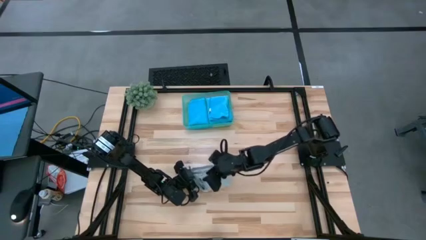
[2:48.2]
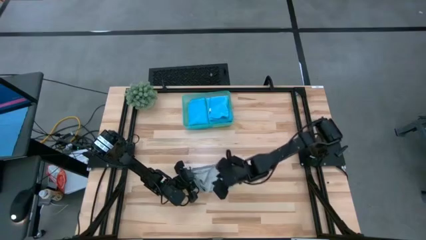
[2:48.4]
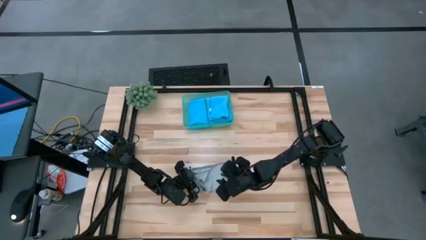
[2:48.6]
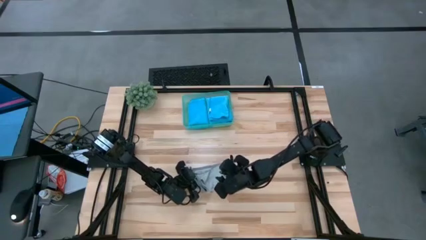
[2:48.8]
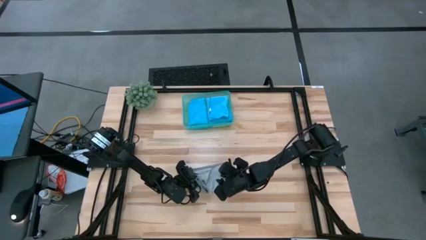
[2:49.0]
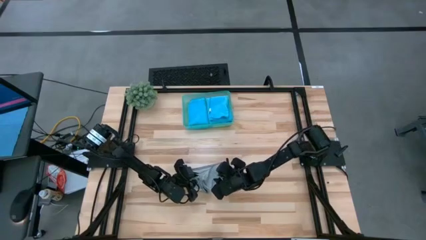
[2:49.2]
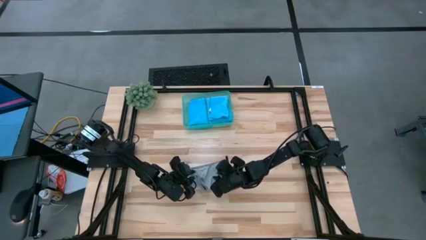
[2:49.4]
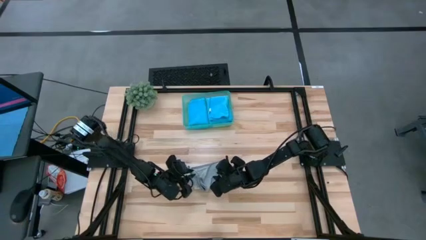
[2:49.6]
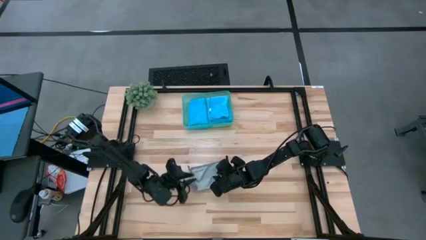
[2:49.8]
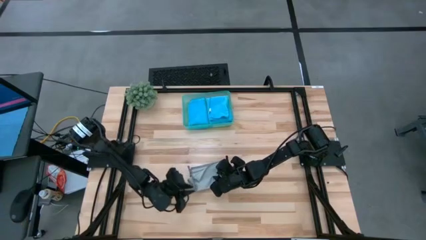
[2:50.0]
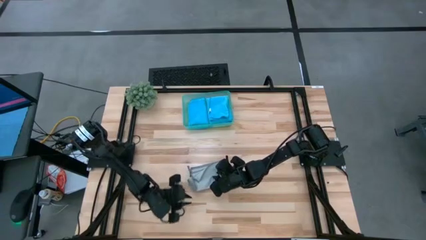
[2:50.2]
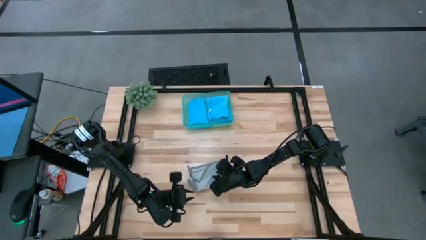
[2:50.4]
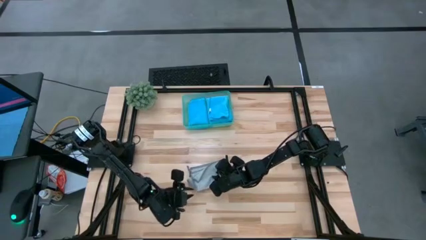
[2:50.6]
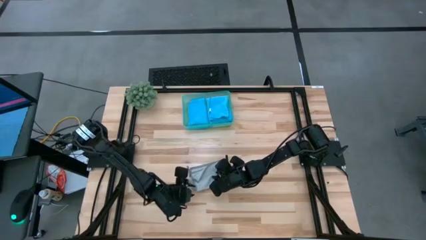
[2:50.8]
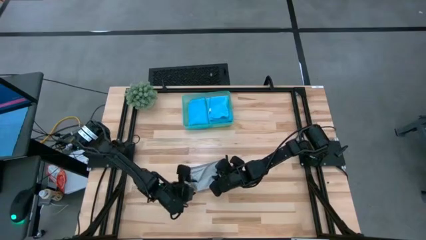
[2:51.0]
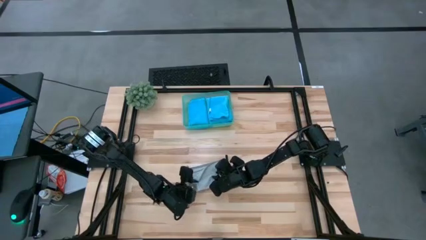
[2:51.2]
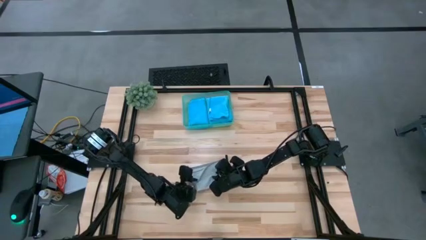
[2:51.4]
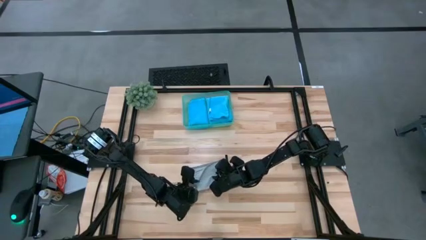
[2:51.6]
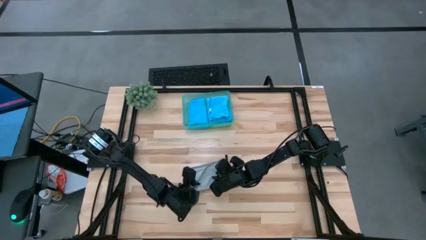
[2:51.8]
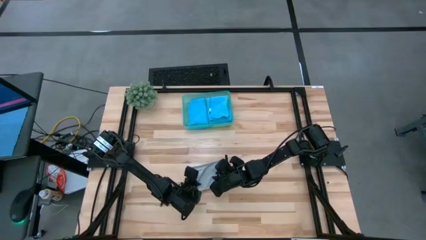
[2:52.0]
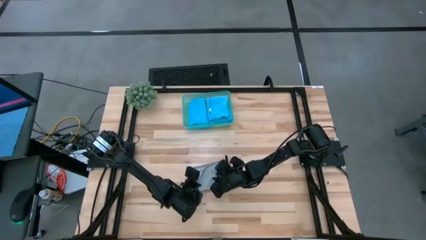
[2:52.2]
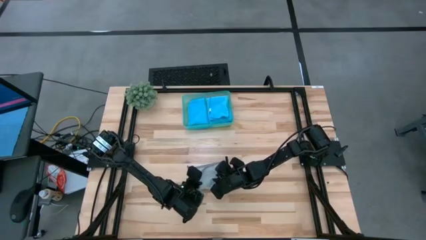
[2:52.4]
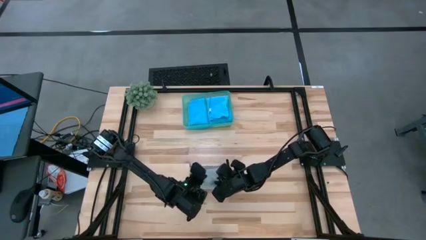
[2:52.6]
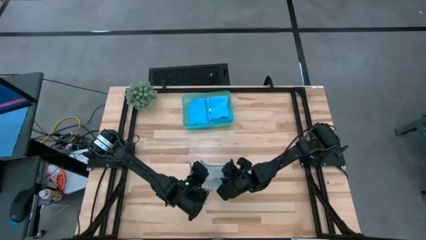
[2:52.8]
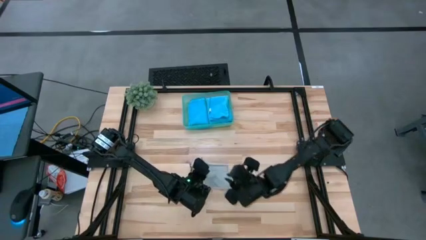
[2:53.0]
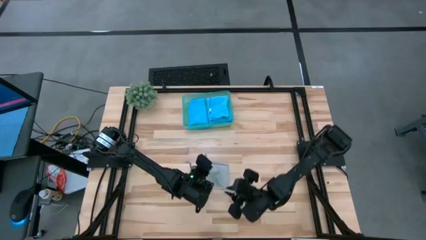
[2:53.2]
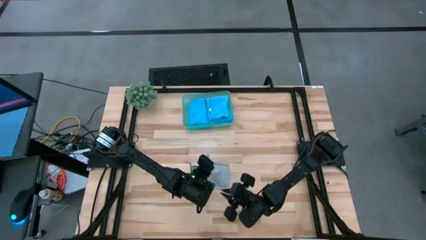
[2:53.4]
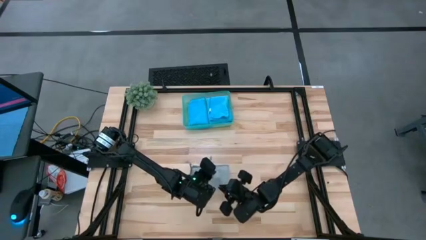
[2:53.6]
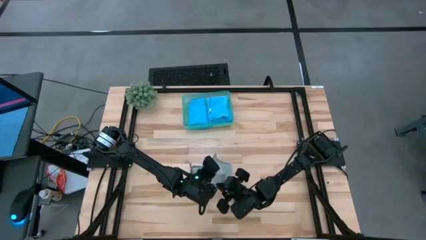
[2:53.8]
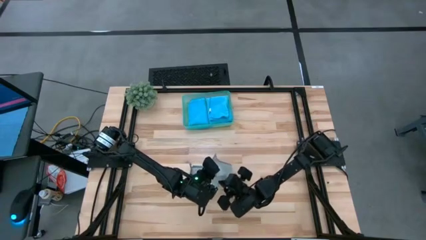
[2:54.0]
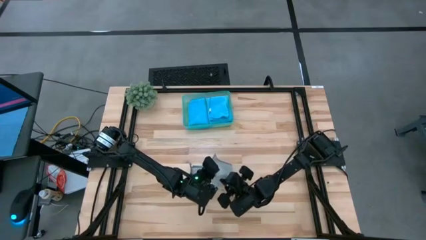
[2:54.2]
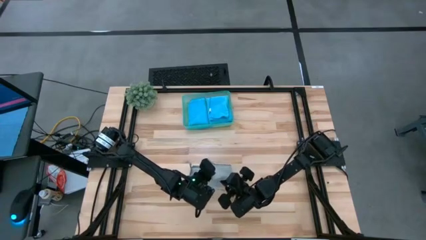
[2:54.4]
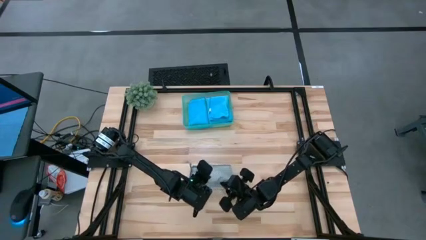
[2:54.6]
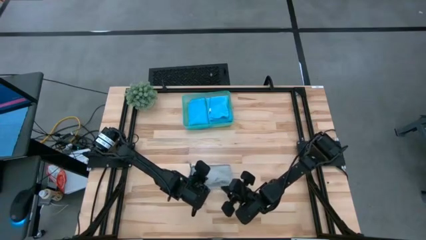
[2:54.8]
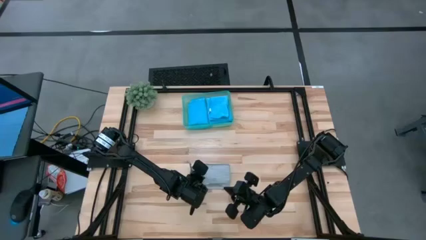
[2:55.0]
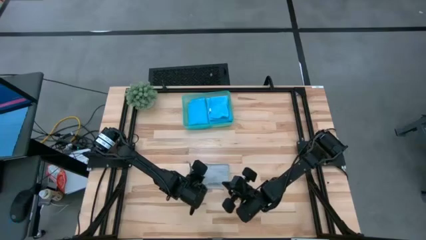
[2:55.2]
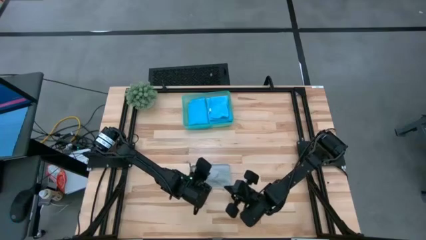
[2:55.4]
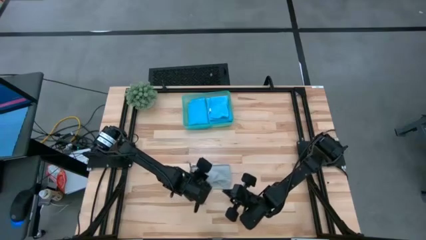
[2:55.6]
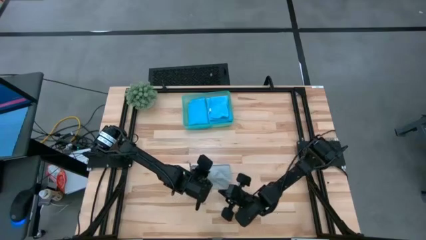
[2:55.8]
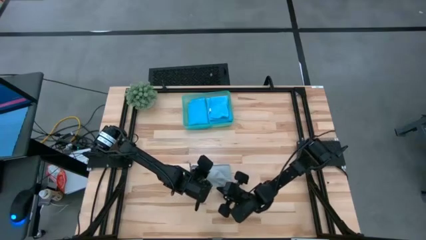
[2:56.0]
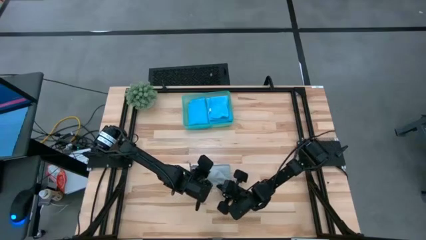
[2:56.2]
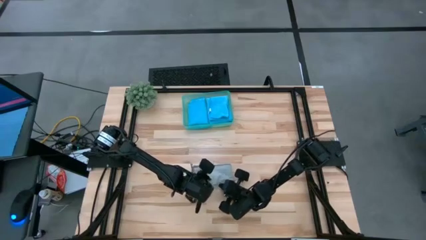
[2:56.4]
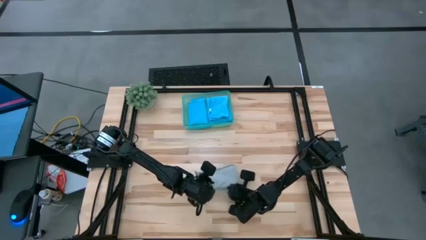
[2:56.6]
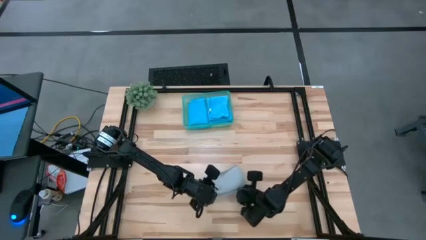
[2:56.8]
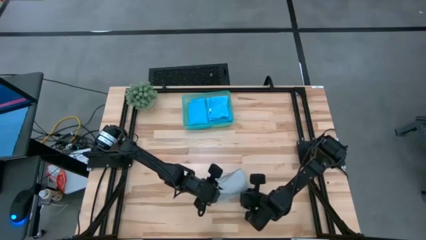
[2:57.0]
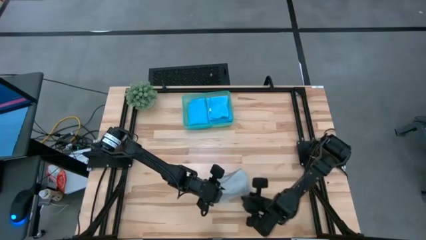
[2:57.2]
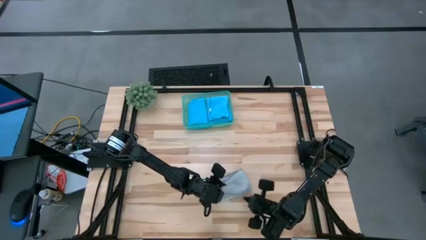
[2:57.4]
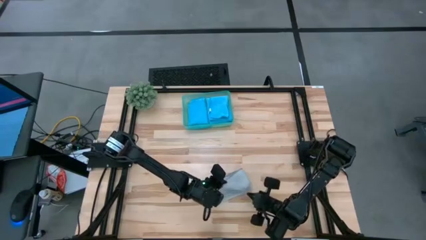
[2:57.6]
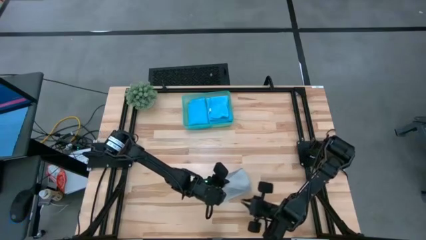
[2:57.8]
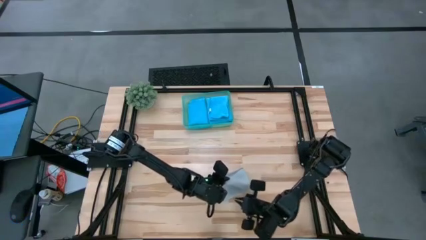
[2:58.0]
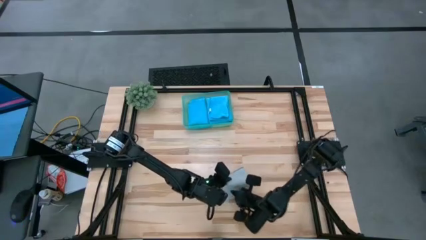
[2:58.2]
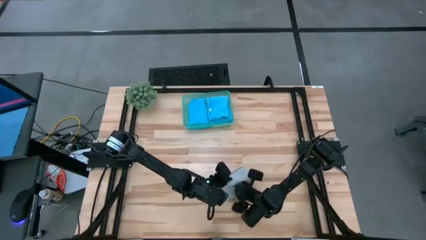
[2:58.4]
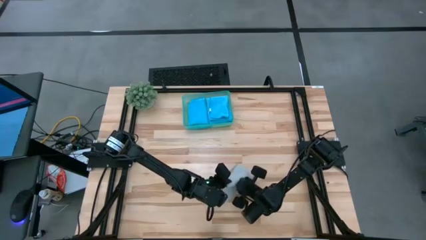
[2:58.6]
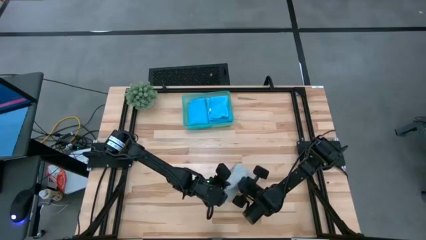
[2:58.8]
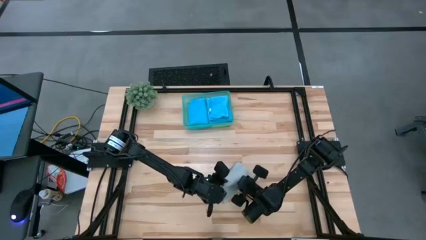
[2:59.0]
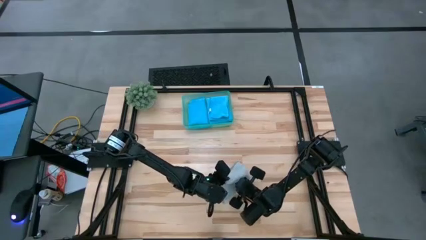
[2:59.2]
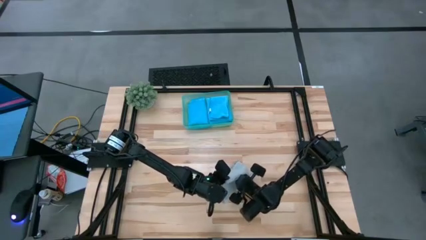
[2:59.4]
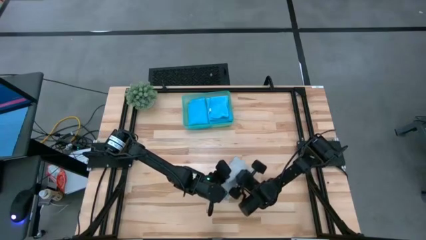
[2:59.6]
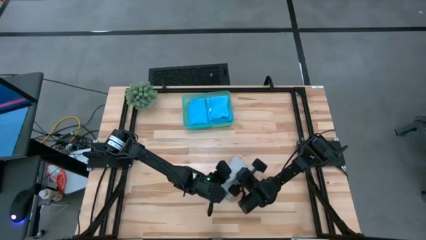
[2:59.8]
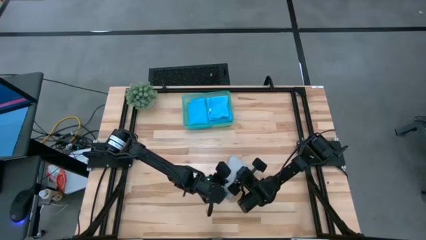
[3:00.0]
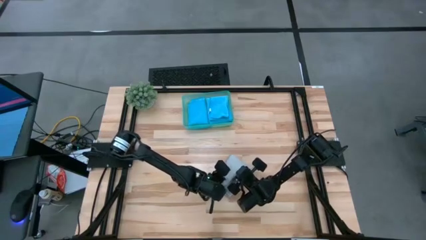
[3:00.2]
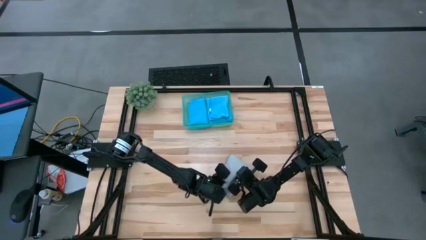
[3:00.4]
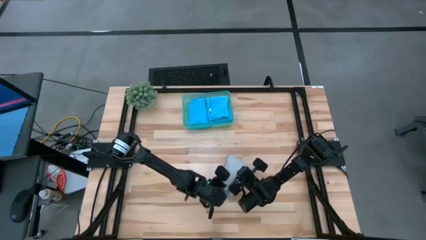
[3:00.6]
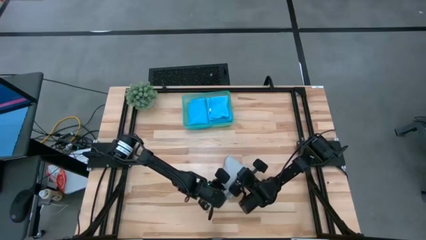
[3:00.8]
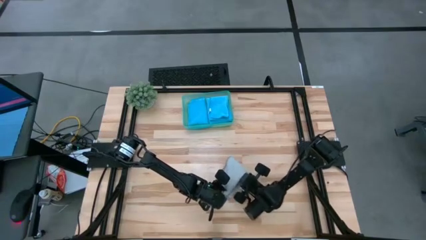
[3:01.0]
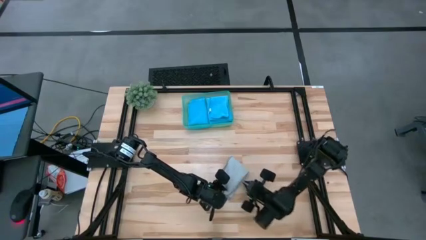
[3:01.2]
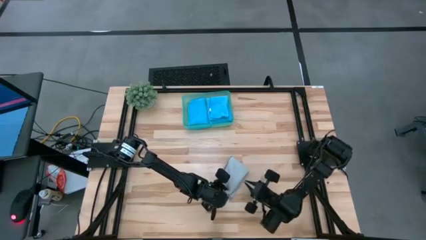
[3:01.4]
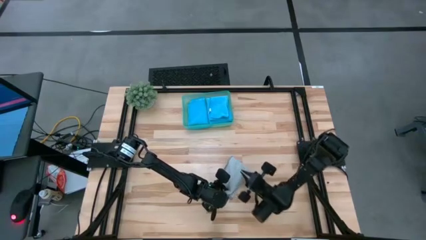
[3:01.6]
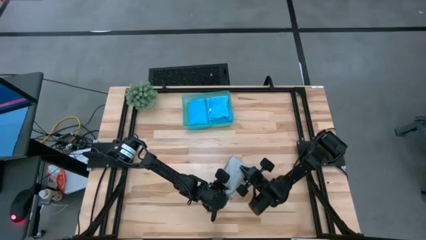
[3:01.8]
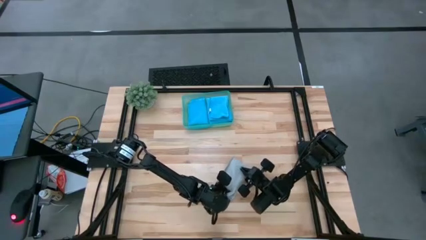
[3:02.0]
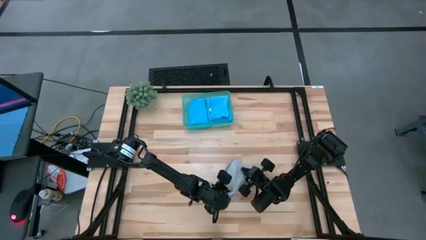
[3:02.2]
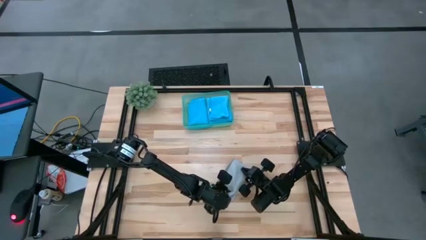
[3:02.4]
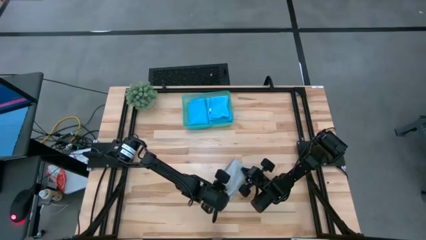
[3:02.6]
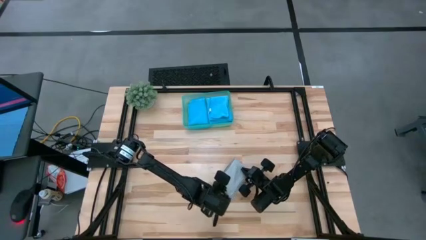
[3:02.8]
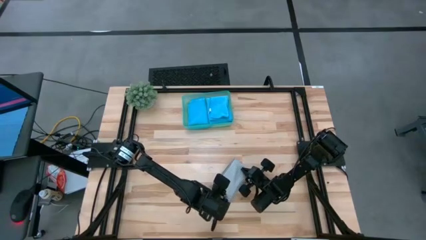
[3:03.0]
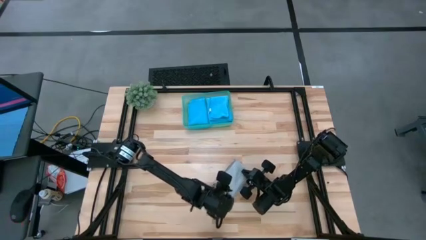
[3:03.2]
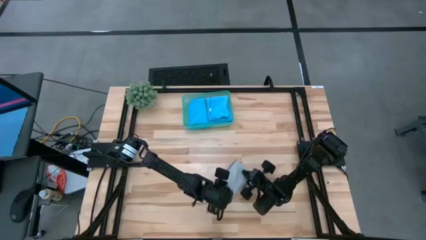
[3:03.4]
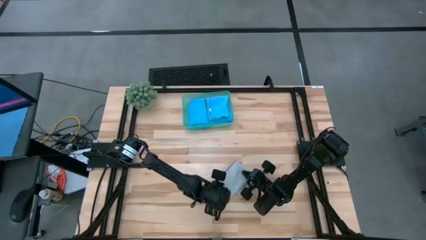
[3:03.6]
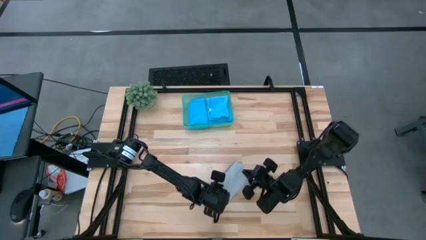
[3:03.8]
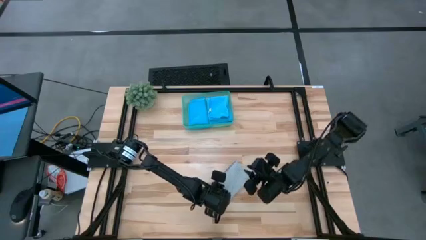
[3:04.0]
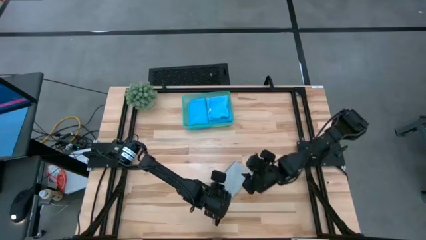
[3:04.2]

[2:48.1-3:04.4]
Task: Fold microfiber towels
Fold the gray microfiber towel
